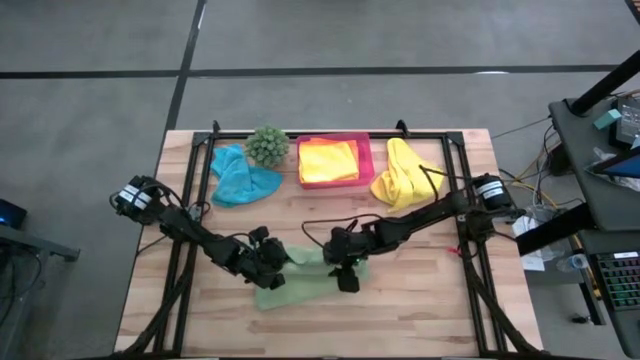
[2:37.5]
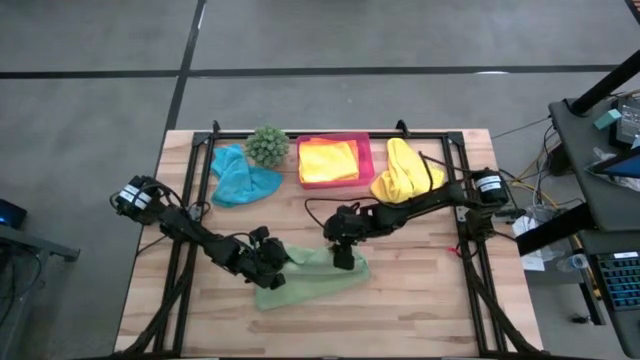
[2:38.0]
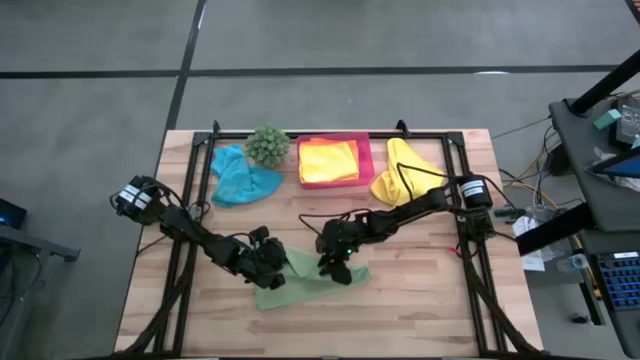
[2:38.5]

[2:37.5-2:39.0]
Task: Fold microfiber towels
Fold the green microfiber towel

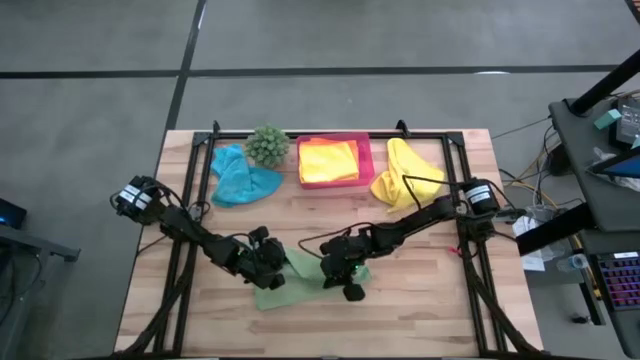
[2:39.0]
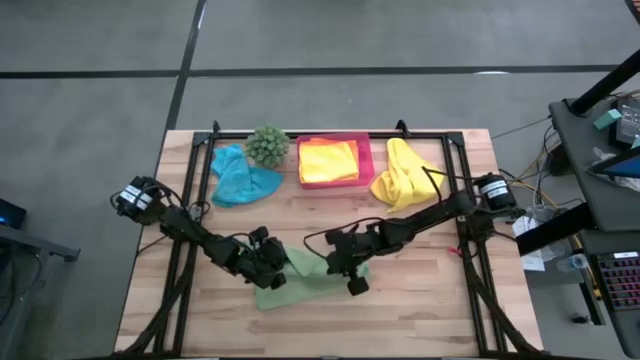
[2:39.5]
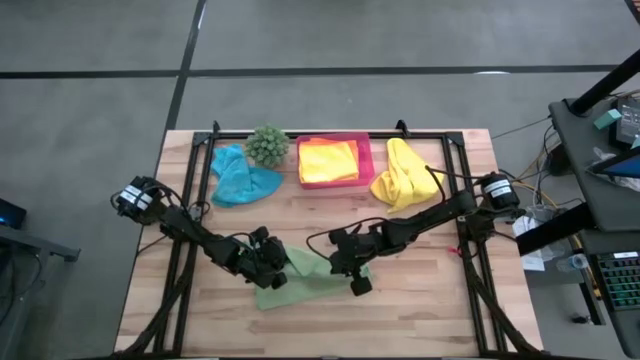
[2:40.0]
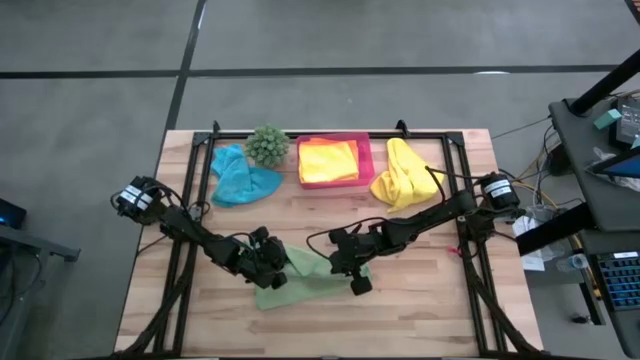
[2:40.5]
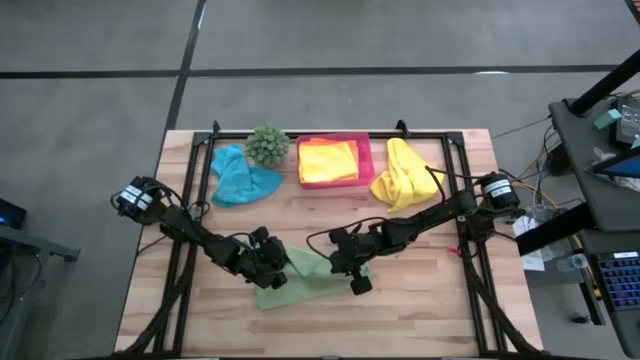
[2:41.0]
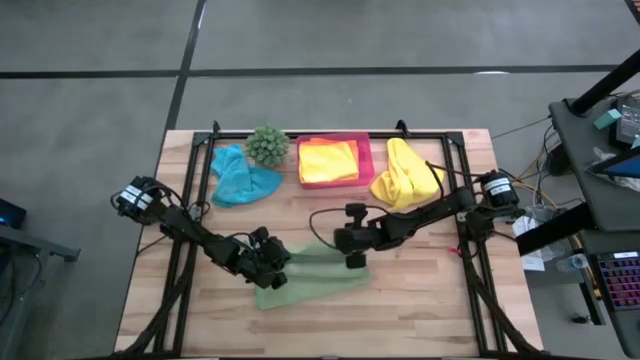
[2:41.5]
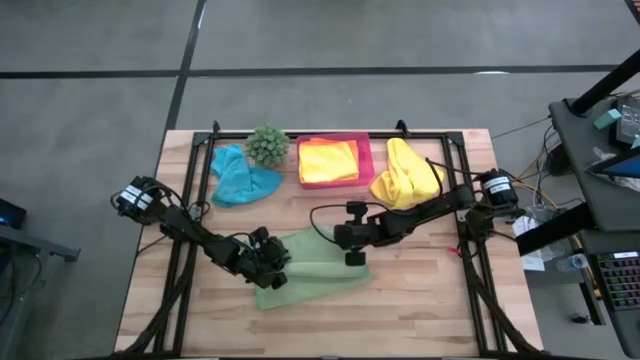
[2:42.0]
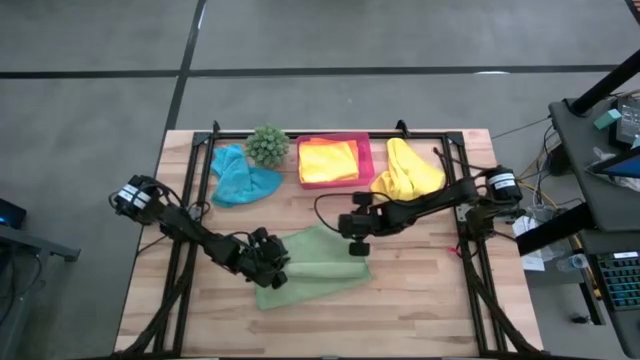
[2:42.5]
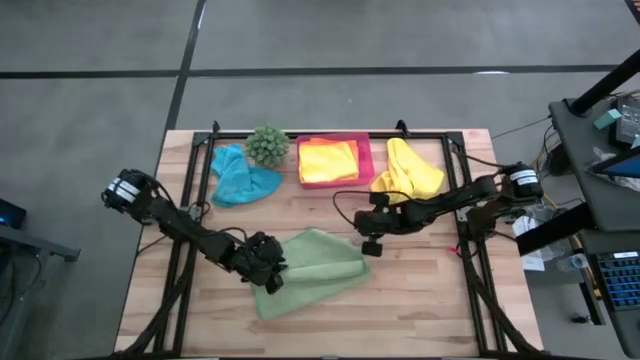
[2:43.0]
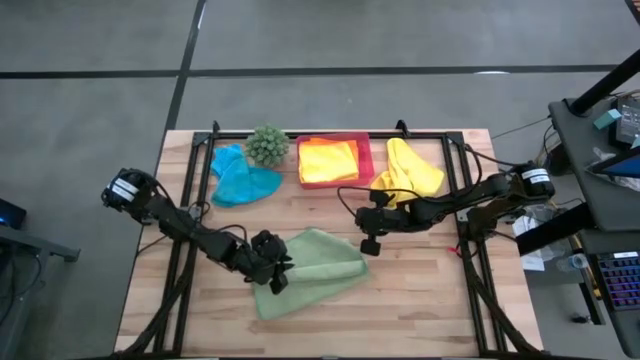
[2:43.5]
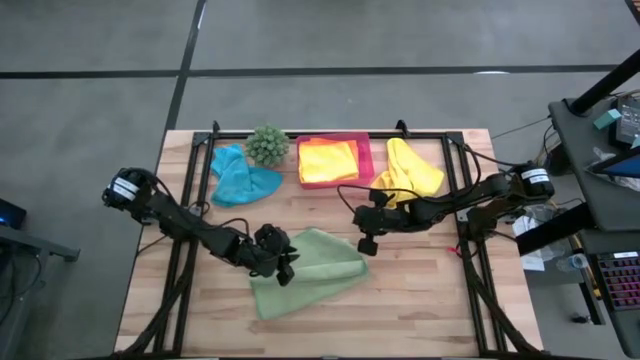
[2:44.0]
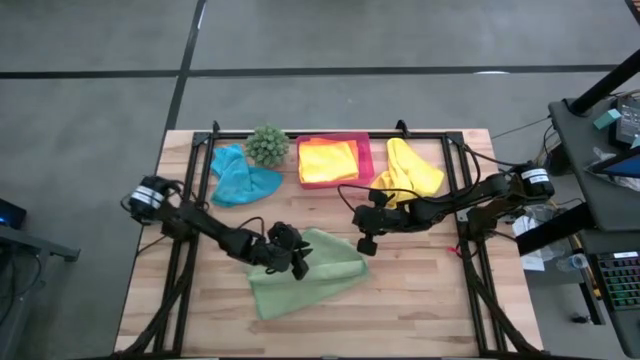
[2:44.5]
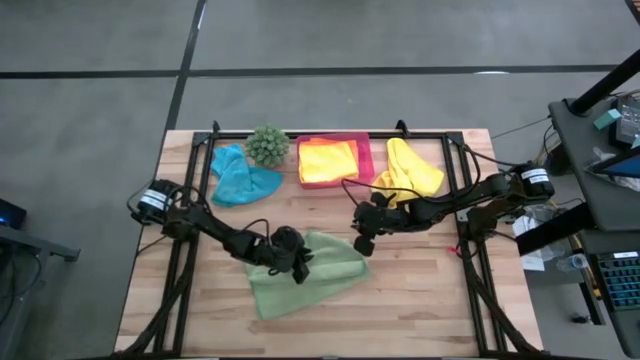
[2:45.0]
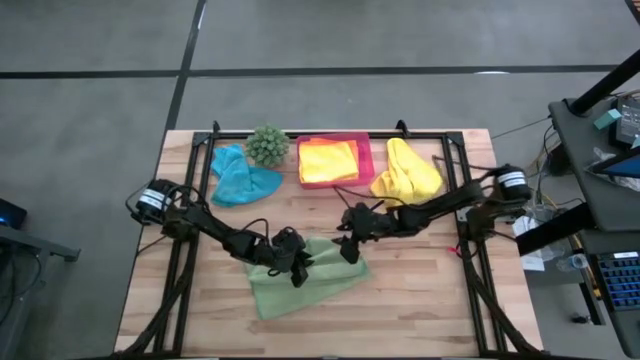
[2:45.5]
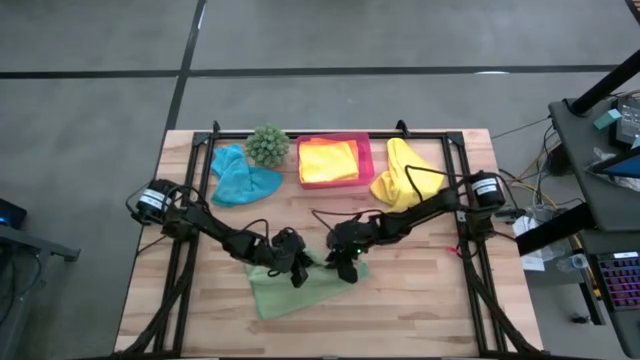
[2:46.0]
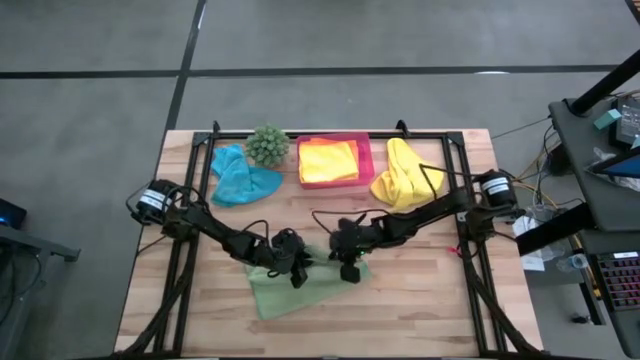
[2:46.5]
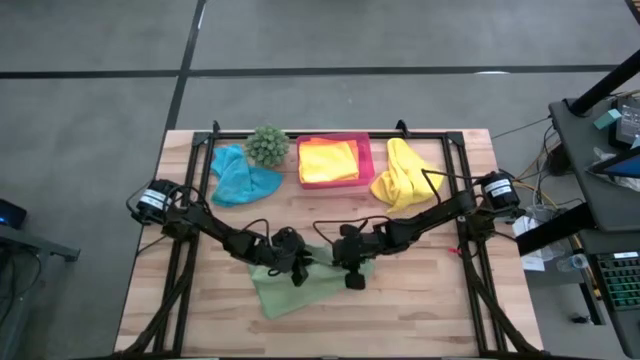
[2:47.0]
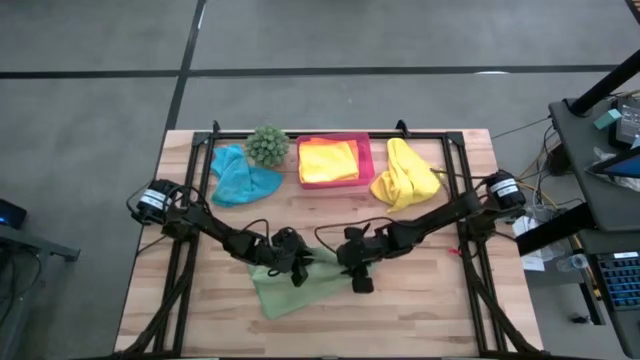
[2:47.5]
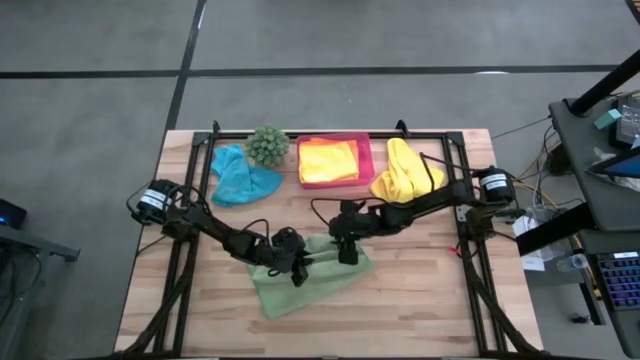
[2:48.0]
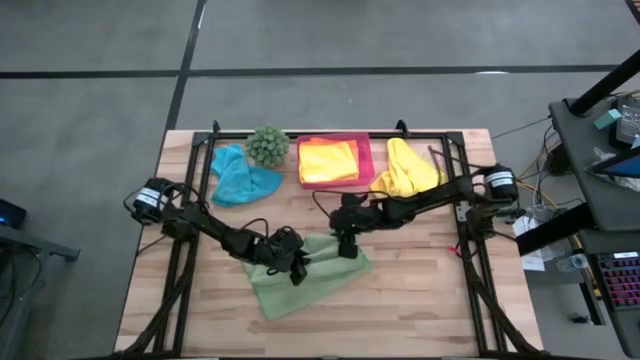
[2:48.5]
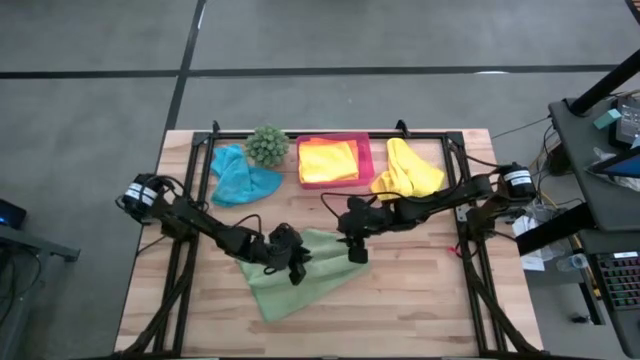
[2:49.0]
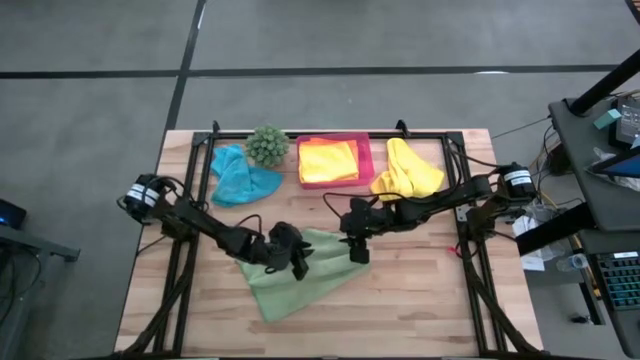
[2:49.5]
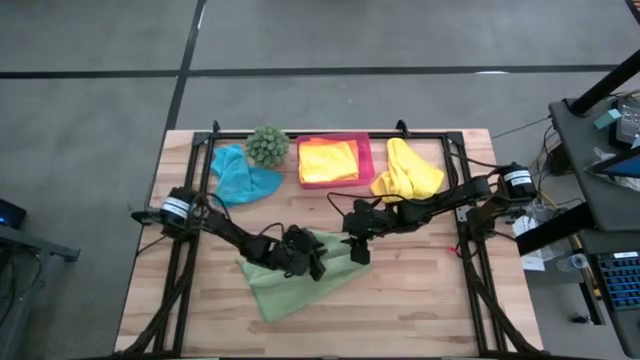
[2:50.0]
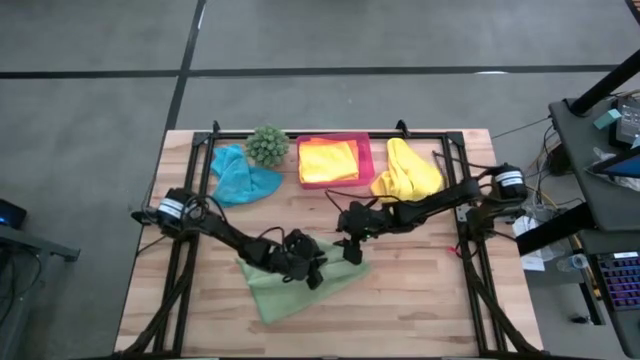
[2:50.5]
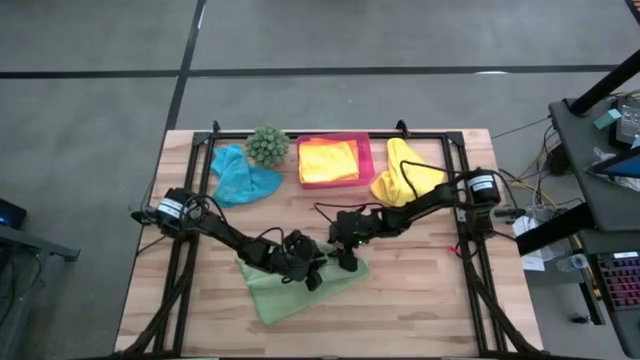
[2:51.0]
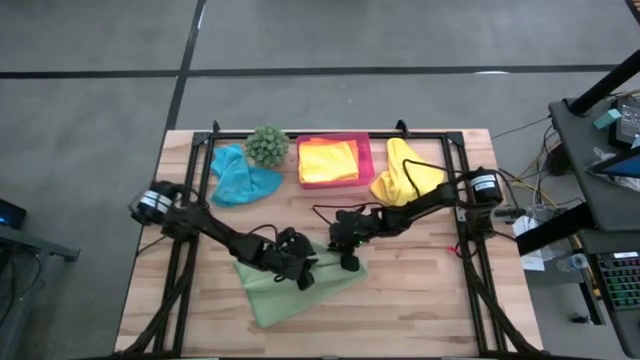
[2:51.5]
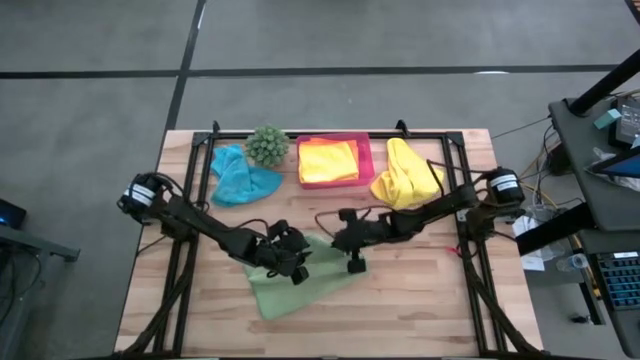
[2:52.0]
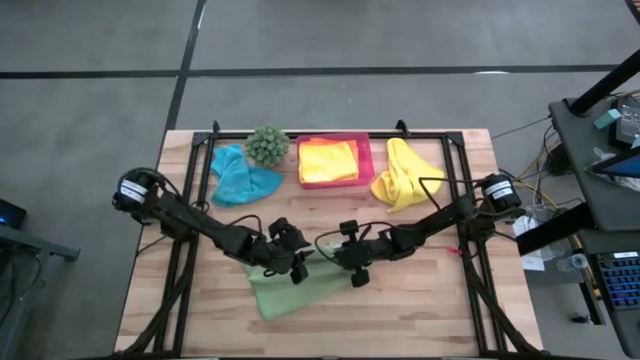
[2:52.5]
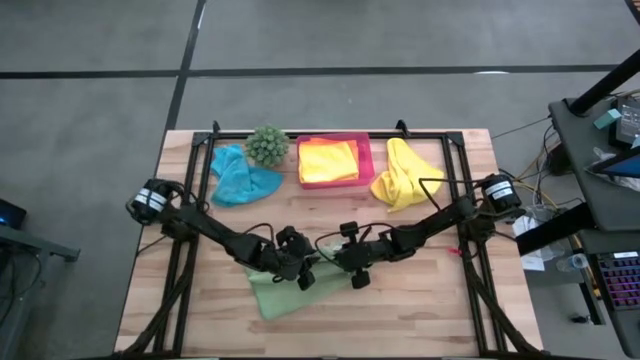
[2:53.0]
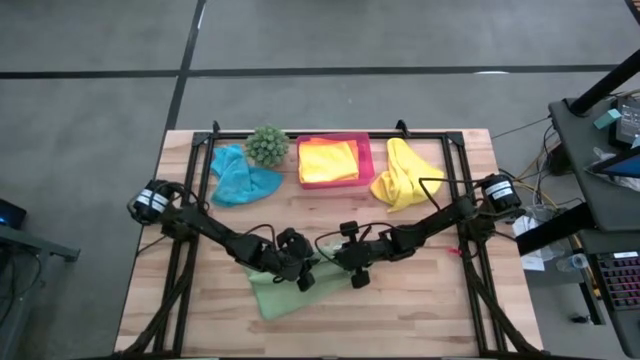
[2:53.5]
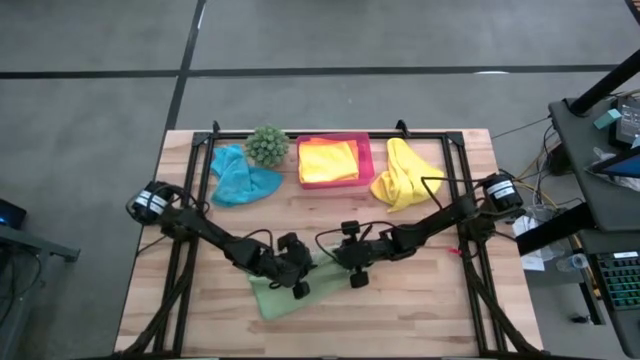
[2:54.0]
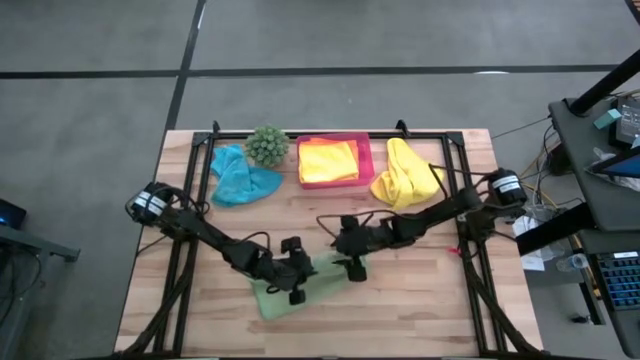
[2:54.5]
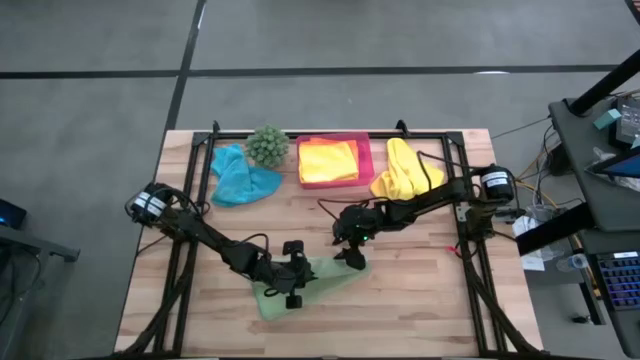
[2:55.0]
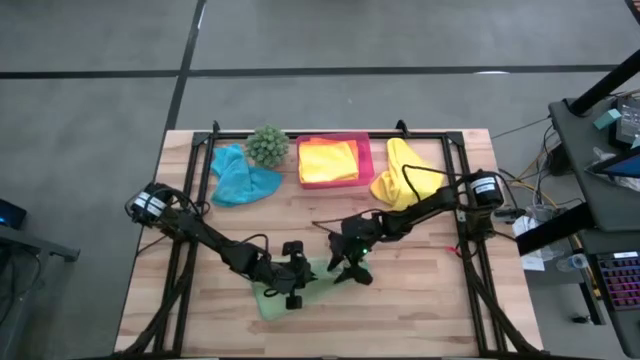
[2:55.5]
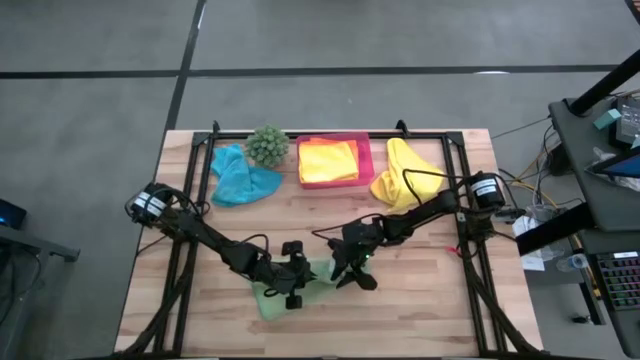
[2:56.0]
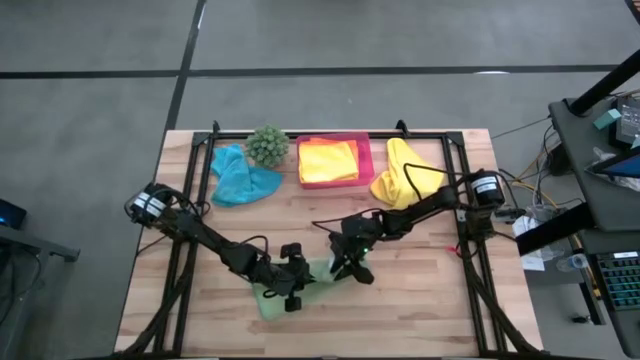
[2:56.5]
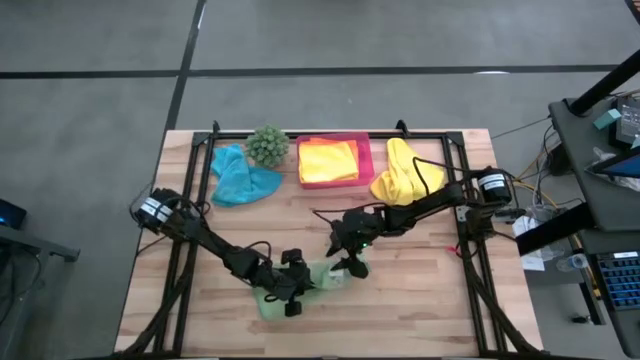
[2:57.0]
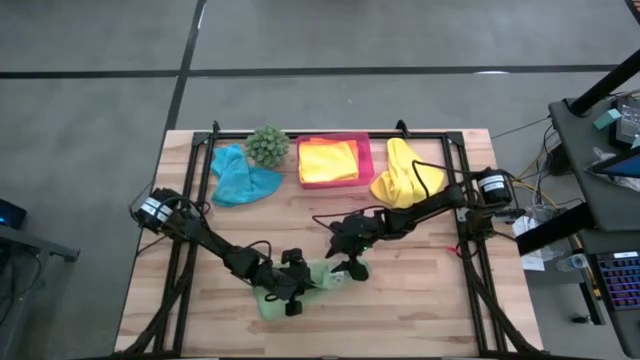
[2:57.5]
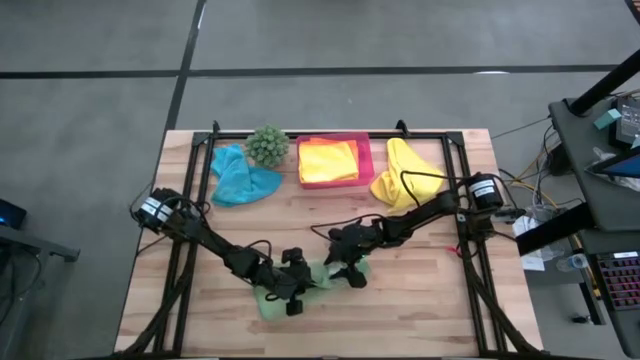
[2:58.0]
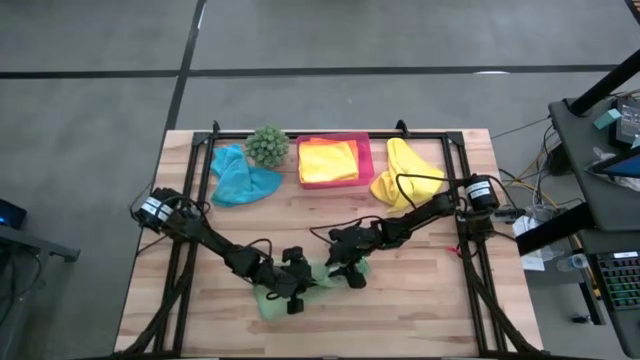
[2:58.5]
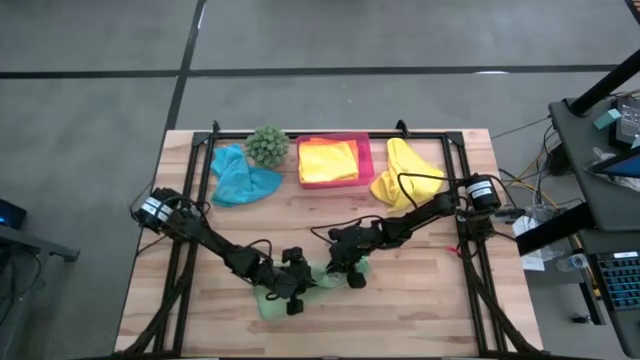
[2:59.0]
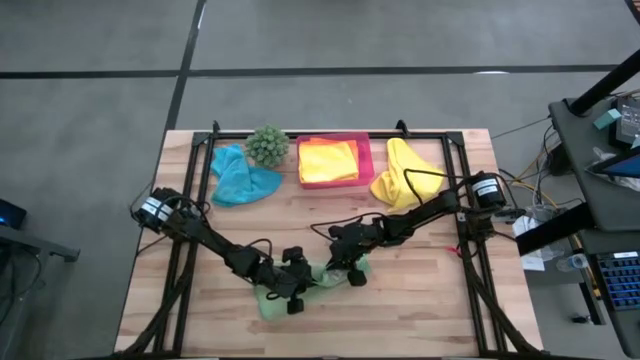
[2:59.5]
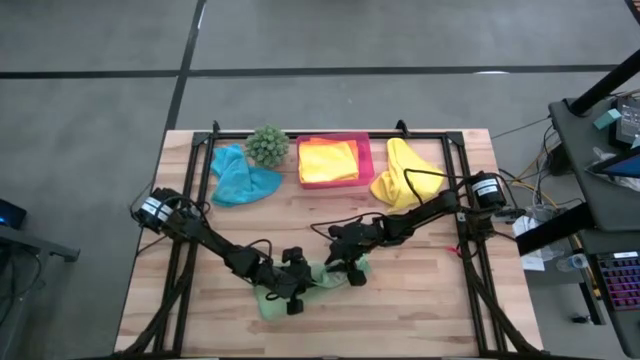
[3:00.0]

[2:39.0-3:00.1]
Fold the green microfiber towel
